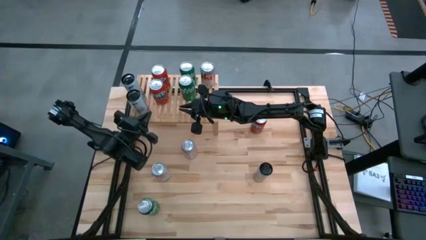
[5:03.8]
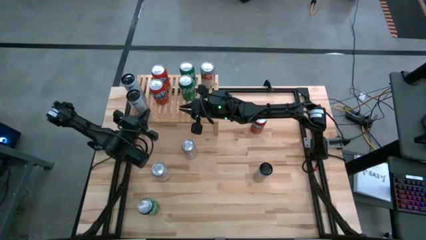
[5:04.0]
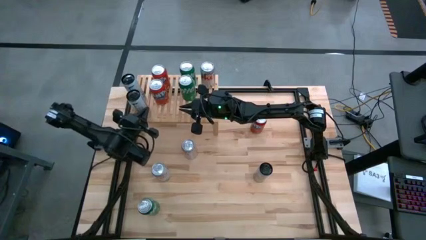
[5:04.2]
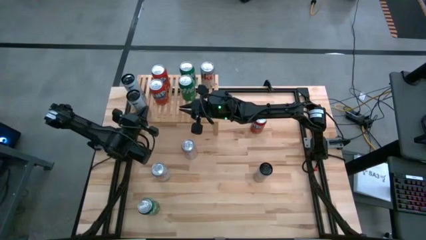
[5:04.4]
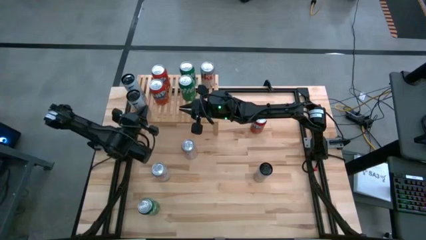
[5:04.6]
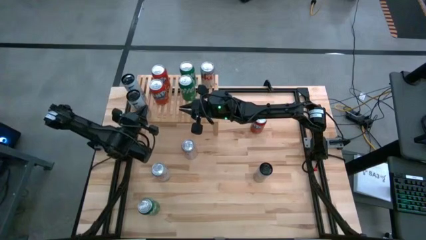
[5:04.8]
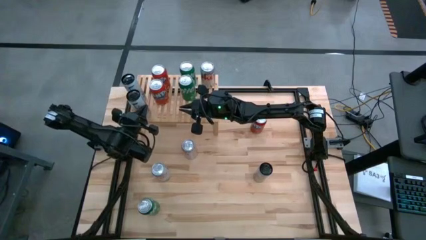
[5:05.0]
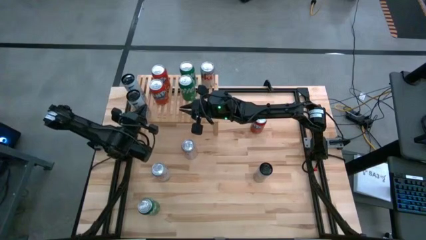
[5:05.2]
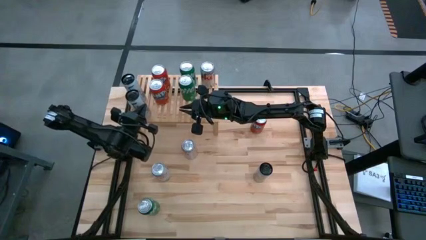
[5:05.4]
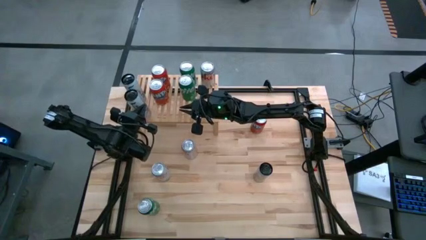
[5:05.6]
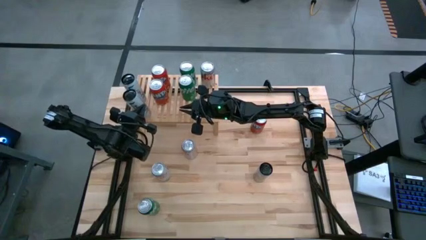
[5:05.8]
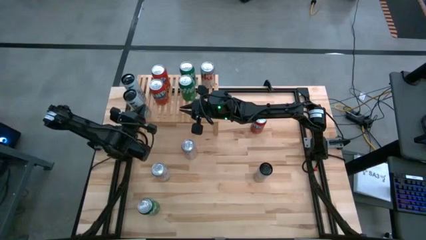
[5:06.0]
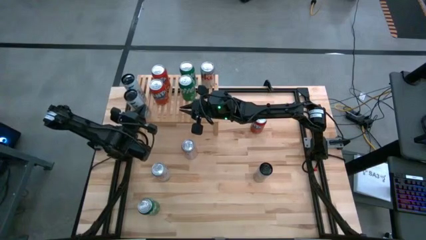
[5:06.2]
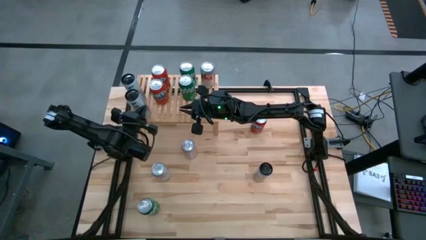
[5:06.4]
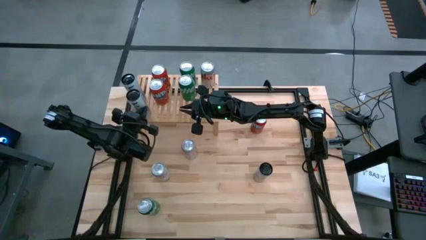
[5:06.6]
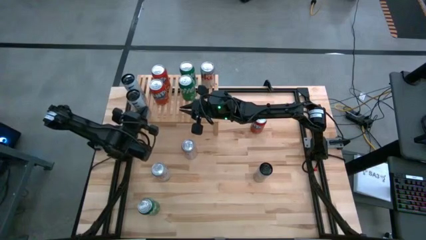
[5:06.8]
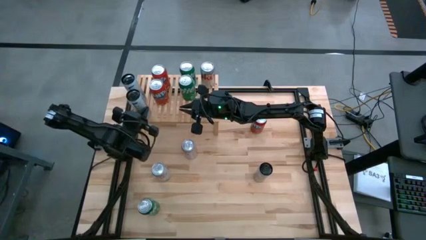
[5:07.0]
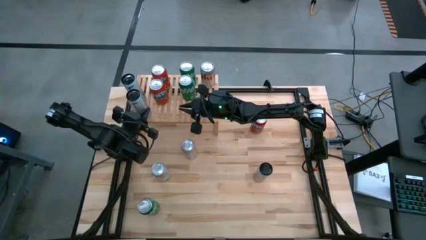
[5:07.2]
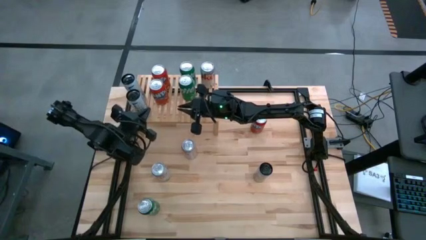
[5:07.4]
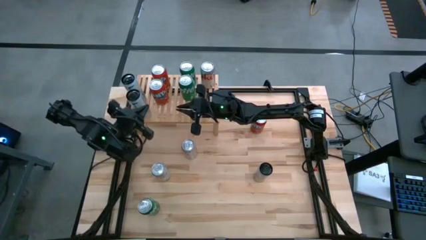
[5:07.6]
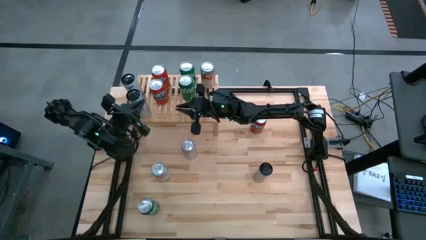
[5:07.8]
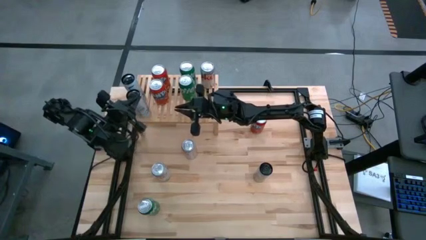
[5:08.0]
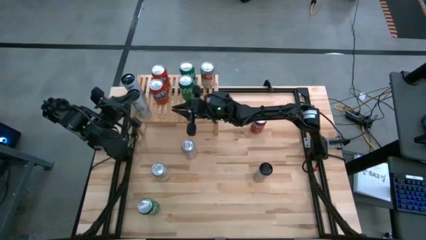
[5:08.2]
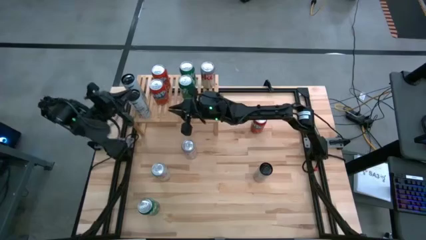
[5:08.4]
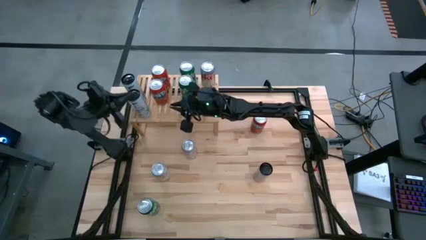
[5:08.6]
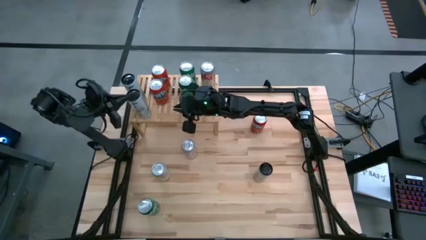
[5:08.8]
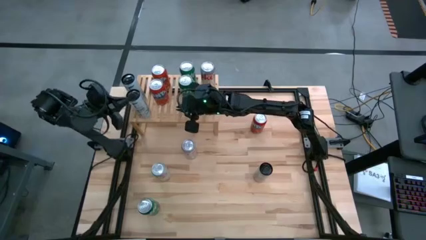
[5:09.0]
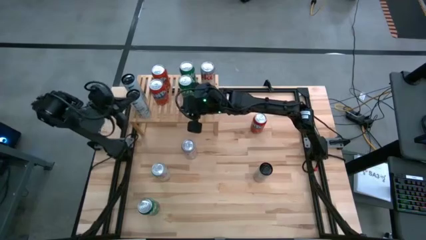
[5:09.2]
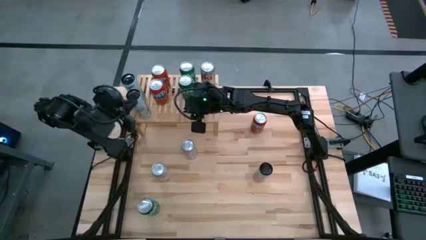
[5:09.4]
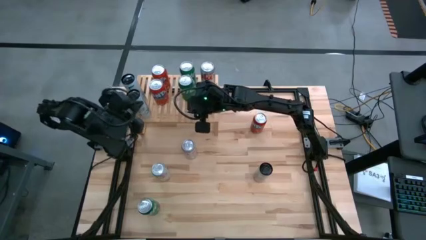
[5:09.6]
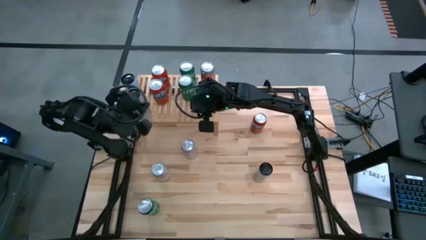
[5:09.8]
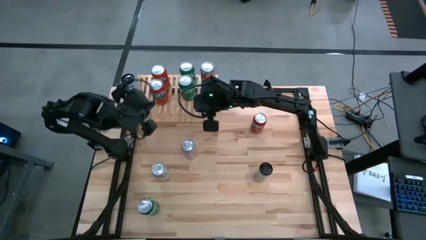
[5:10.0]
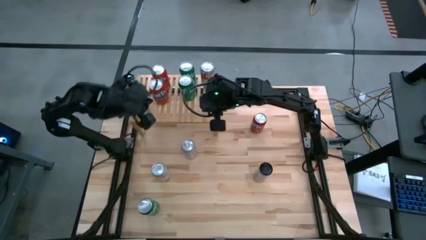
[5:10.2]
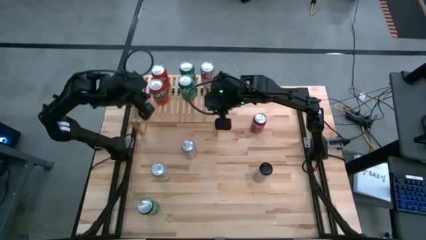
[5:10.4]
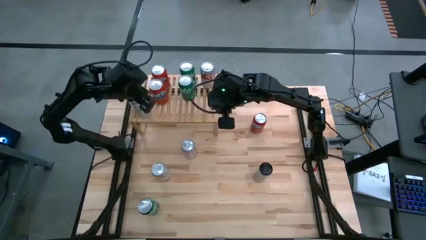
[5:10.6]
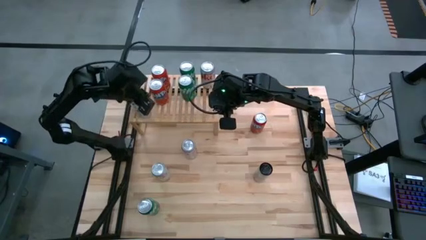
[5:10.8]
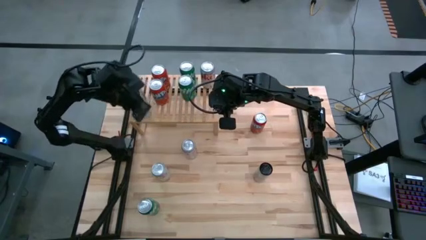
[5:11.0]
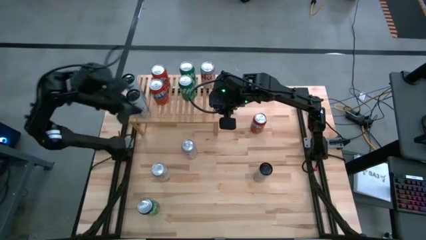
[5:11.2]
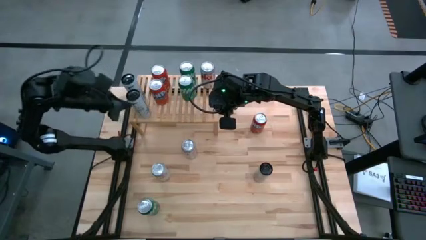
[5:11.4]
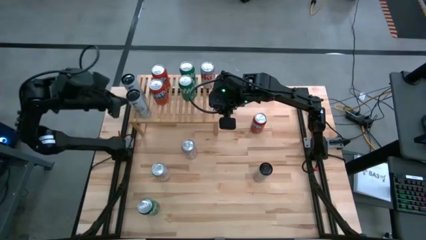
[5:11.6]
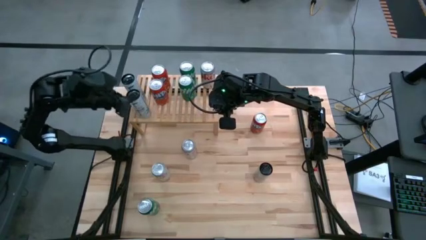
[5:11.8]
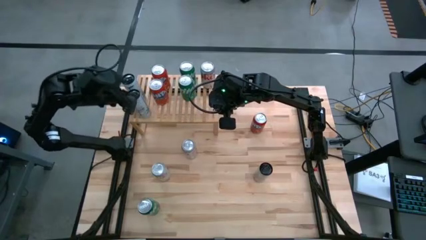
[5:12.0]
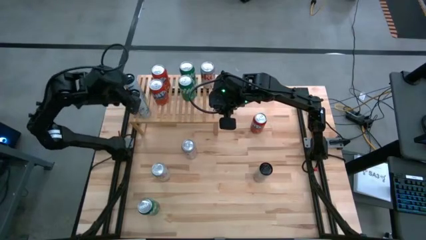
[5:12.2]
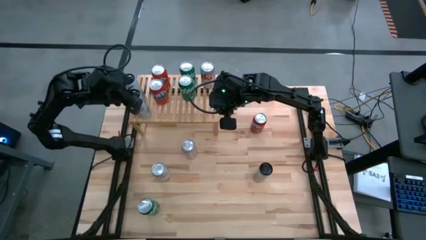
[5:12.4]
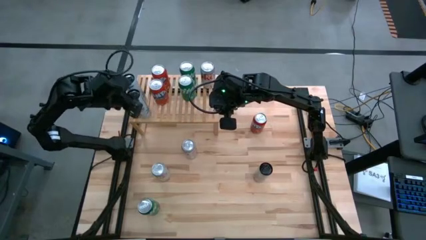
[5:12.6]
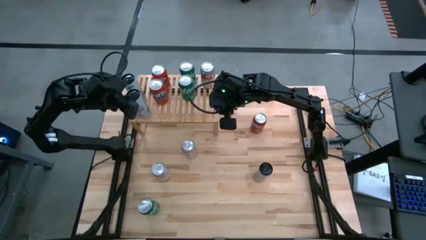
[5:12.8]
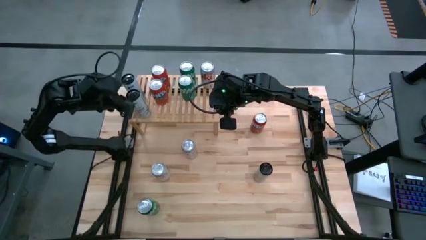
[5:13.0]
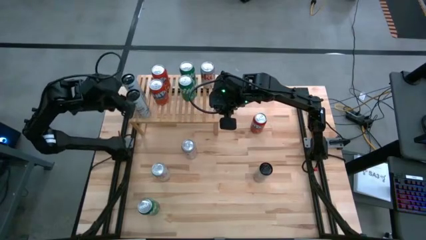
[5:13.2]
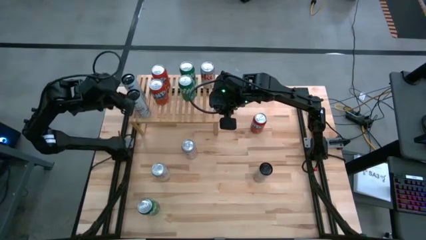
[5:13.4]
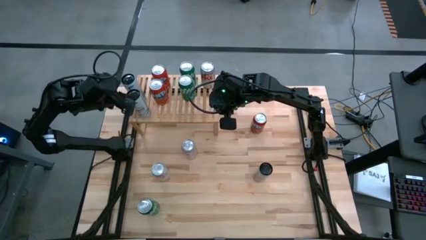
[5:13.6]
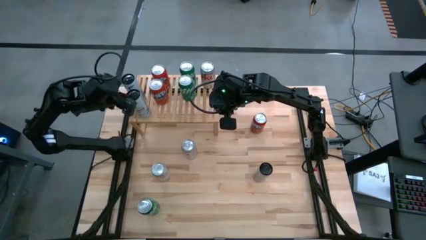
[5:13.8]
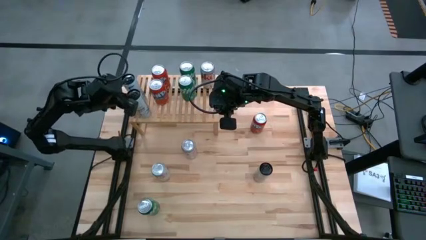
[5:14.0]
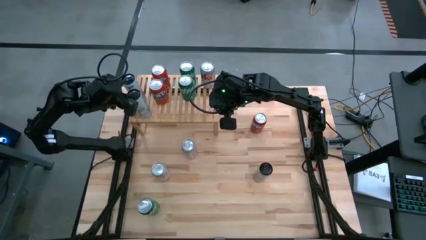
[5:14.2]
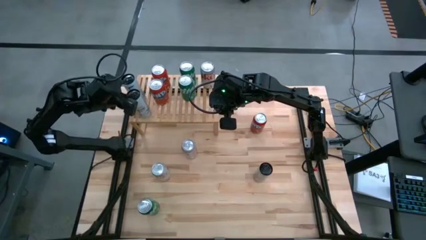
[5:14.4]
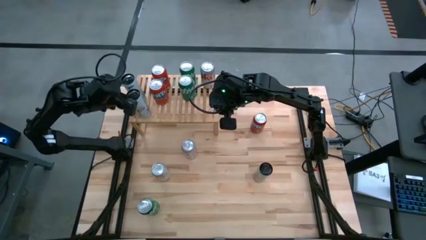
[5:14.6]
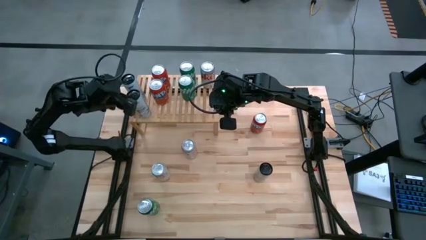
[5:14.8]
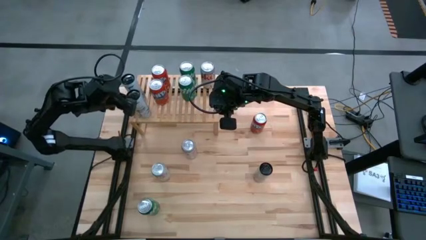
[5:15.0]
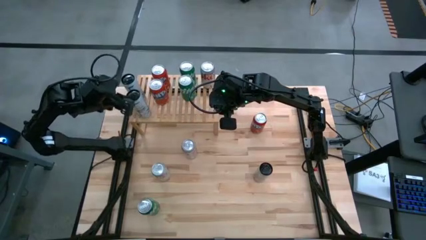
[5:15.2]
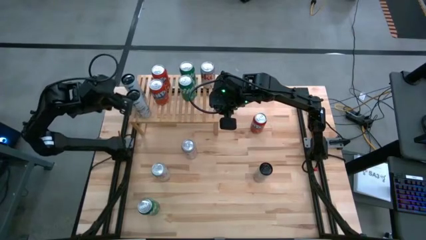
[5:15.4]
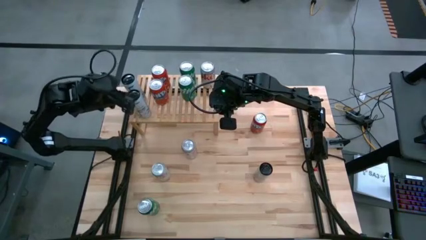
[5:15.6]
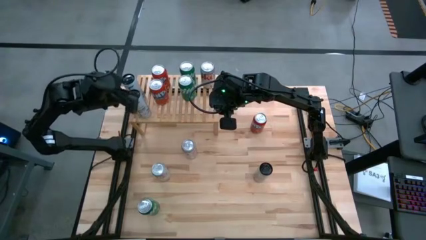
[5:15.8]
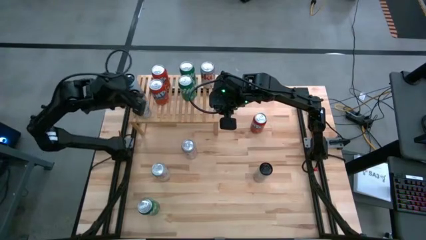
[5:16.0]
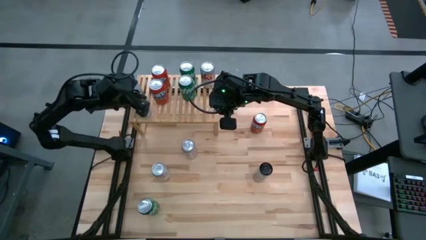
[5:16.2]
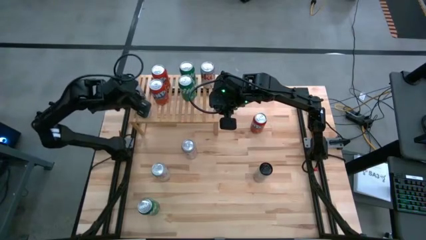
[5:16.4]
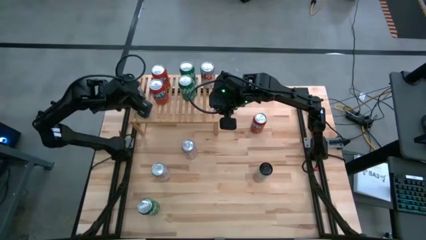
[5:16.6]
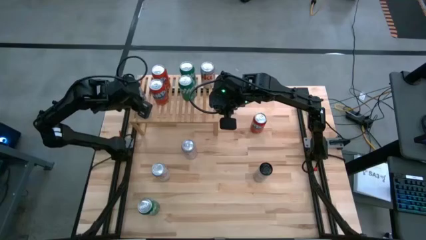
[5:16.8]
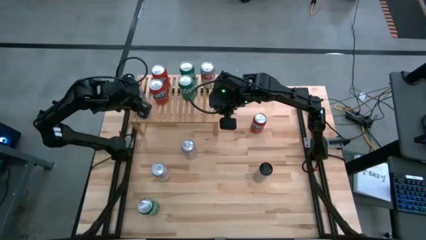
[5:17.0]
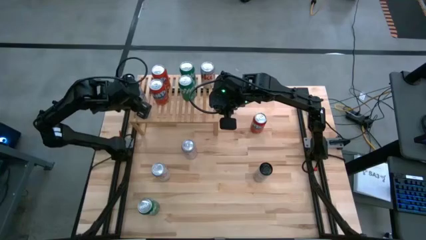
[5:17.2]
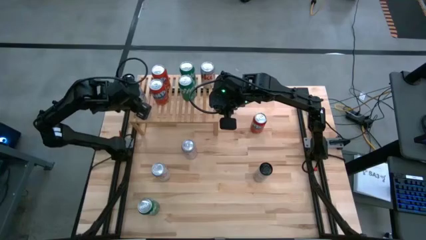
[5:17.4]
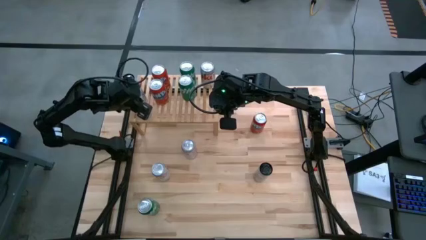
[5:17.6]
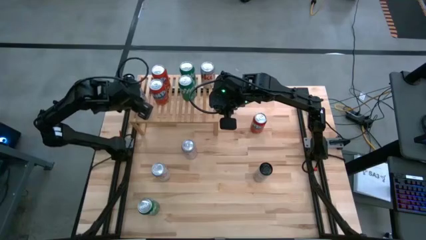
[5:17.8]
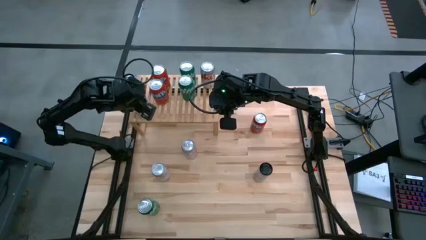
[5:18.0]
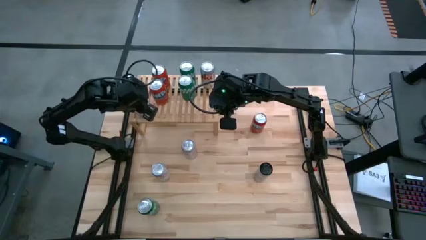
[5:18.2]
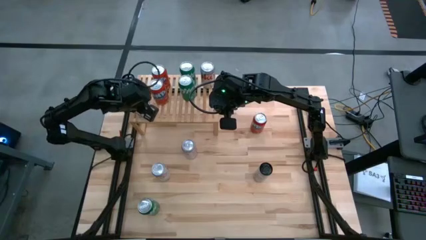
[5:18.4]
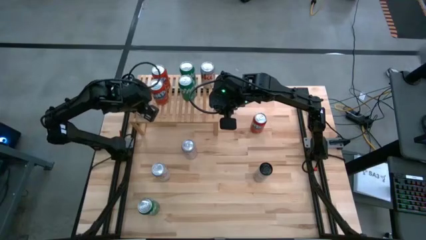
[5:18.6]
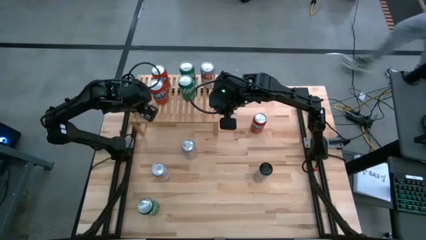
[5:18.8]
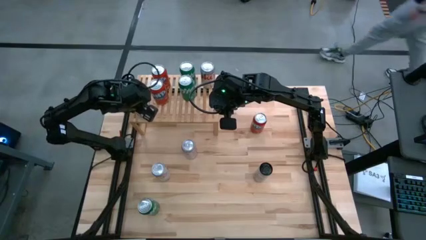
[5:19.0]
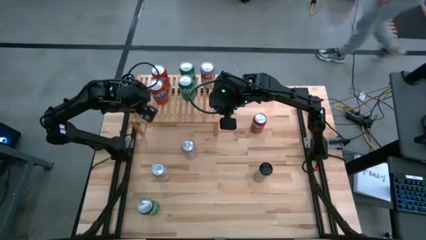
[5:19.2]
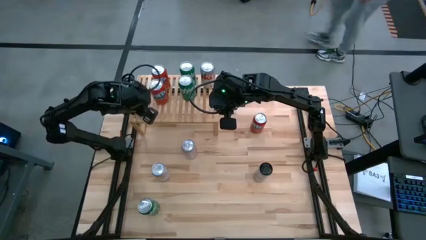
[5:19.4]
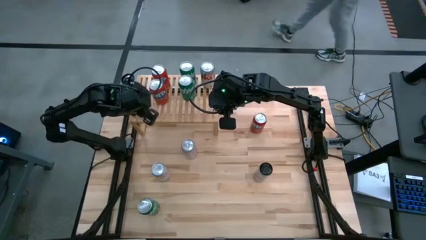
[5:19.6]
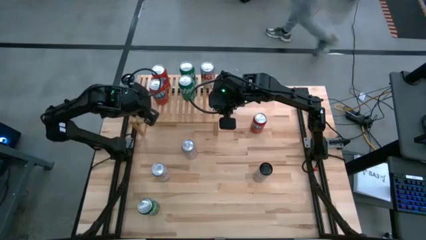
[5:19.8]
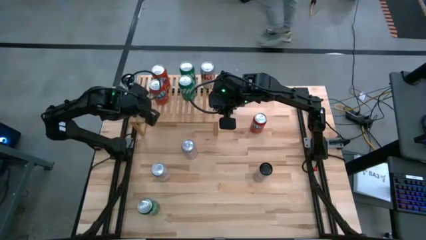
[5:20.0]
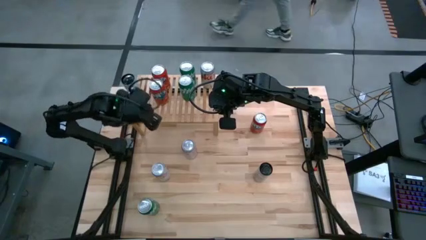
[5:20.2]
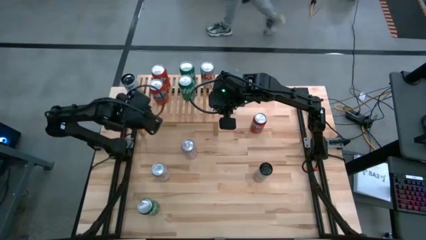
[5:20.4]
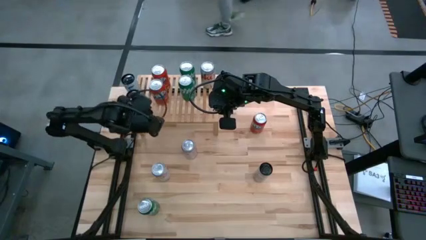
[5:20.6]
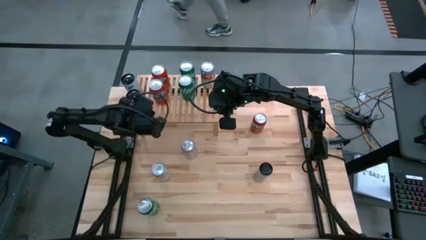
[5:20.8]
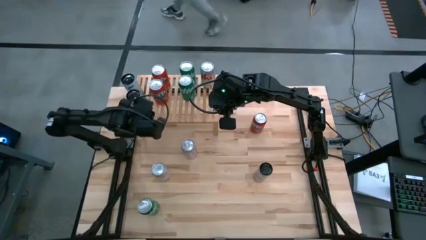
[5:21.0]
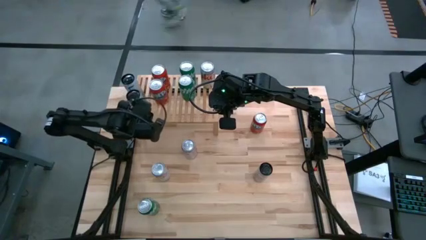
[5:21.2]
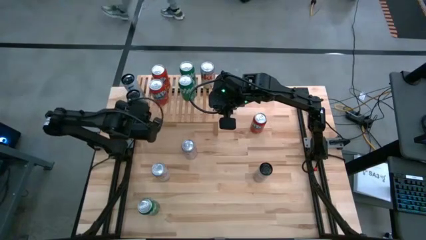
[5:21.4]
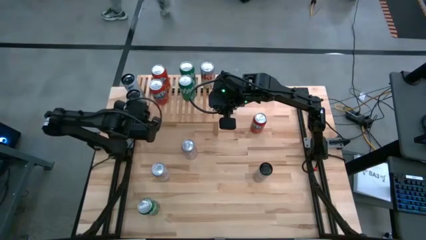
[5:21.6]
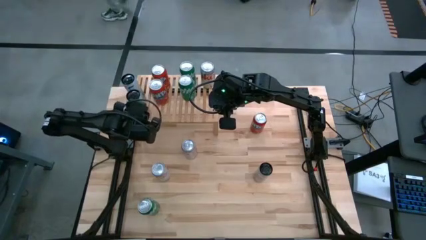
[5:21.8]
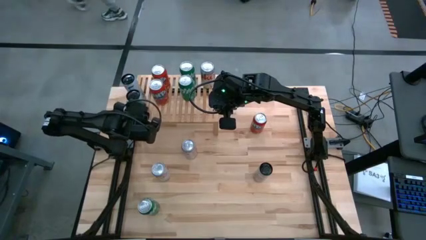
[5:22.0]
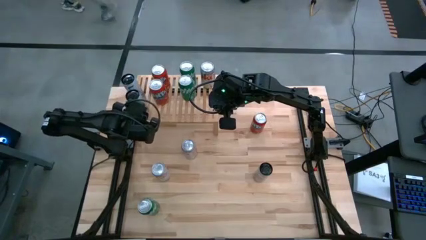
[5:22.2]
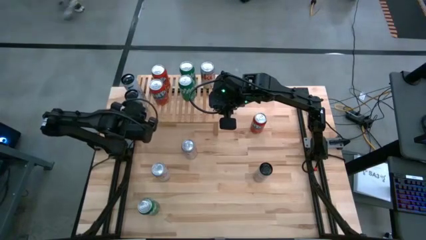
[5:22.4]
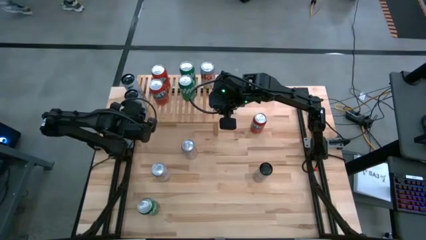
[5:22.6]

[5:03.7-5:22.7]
Task: Place canned beverage on shelf
Put the top white/blue soda can on the shelf aligned with the other white/blue soda can
